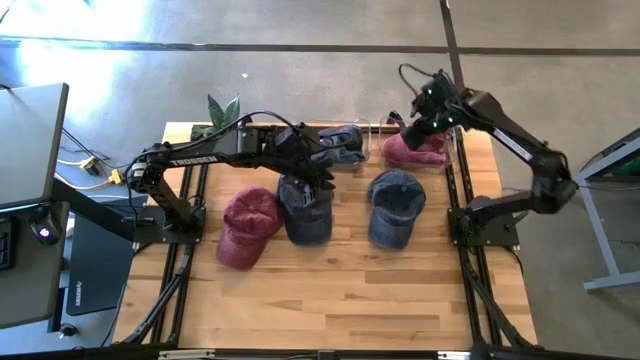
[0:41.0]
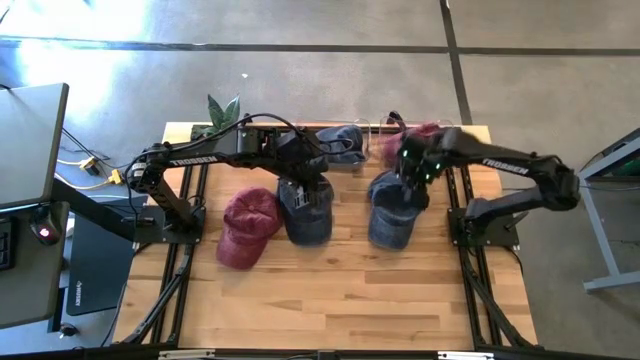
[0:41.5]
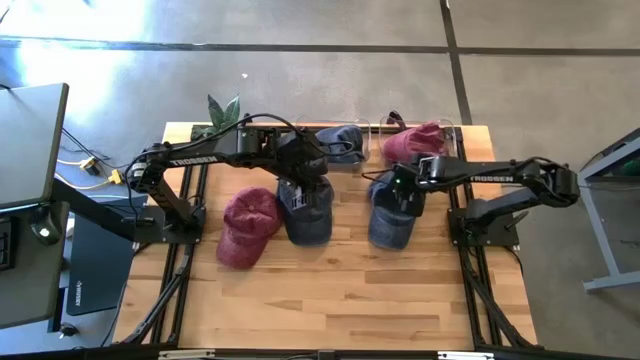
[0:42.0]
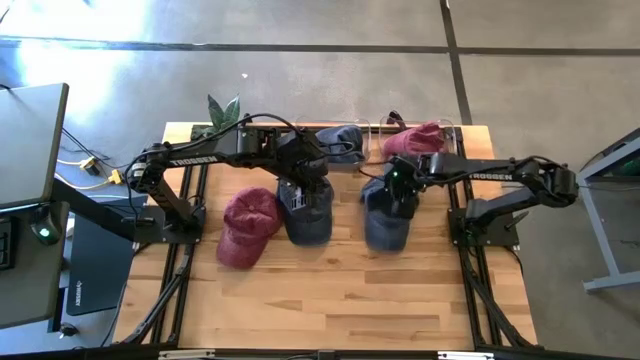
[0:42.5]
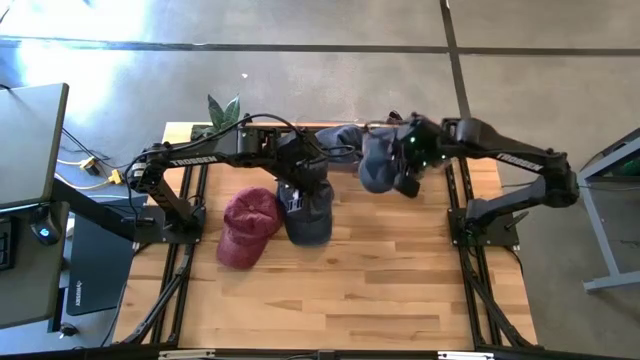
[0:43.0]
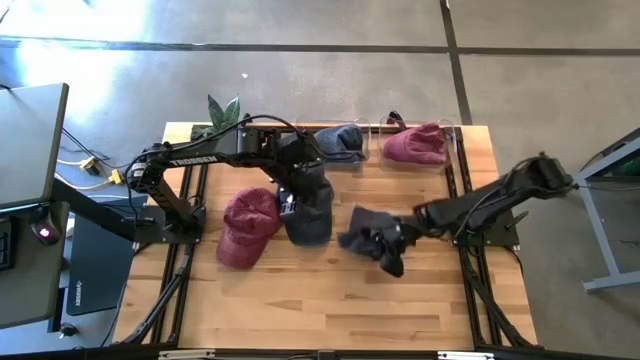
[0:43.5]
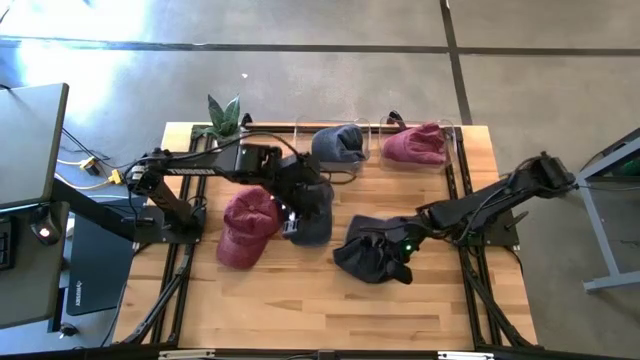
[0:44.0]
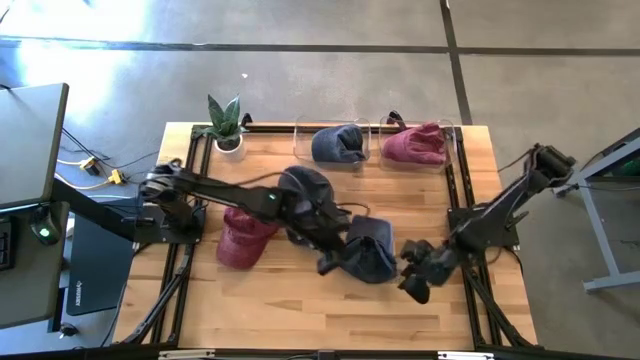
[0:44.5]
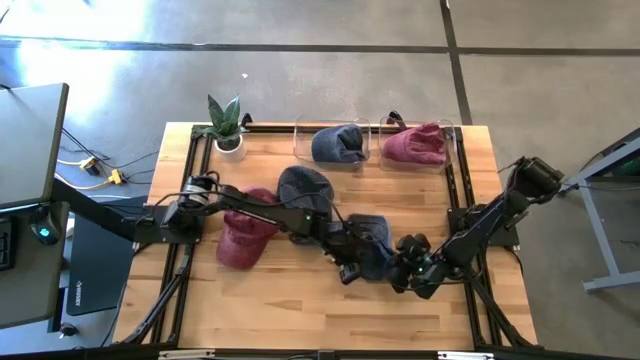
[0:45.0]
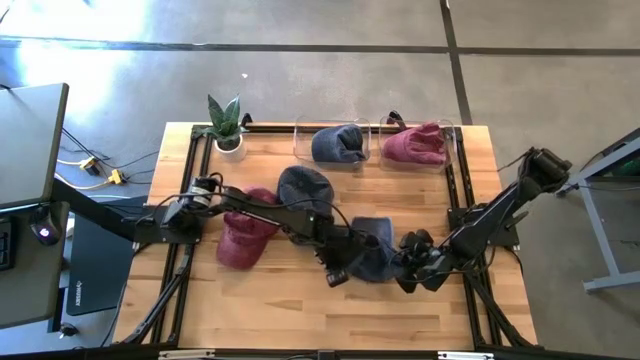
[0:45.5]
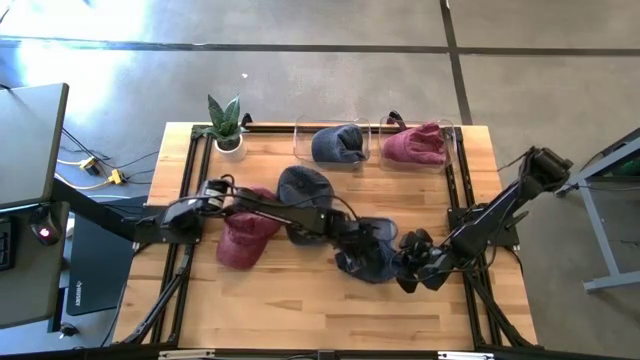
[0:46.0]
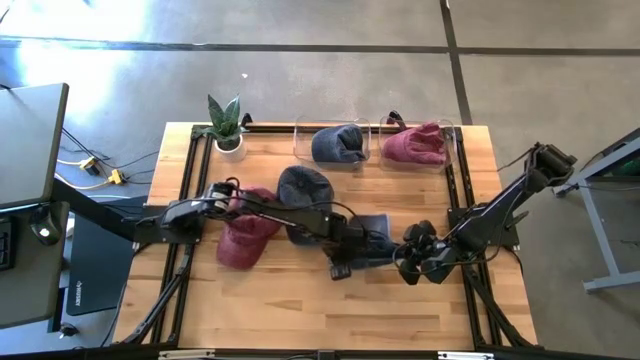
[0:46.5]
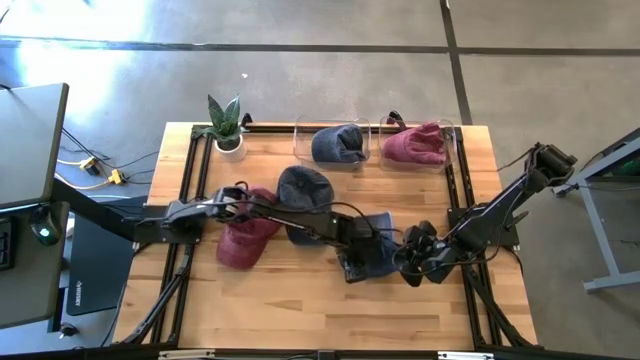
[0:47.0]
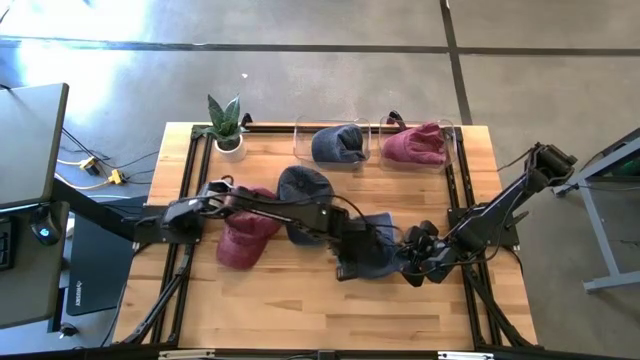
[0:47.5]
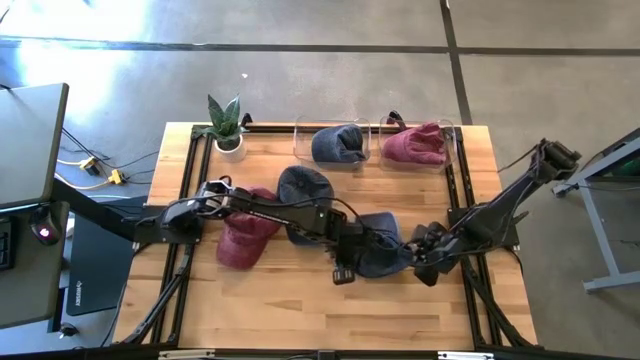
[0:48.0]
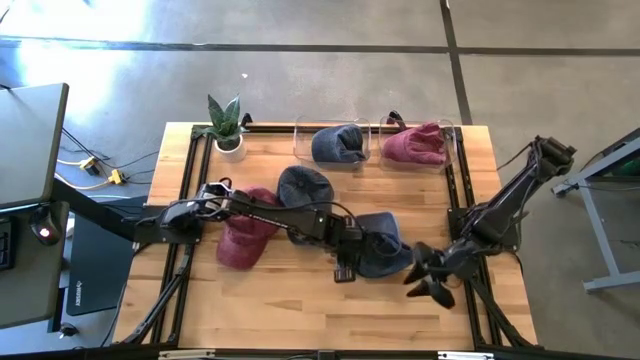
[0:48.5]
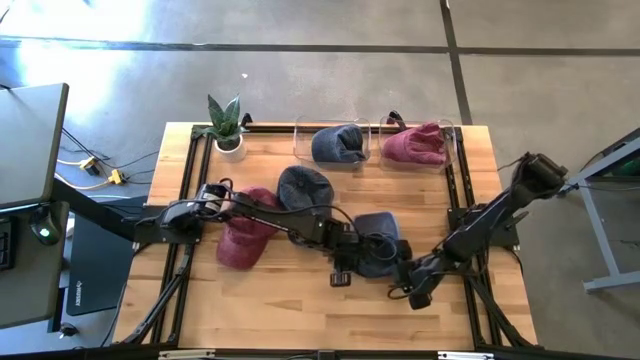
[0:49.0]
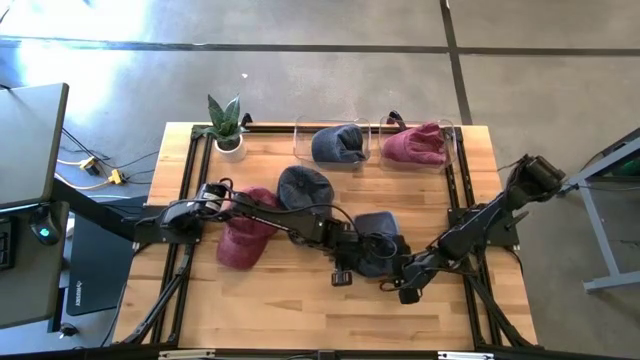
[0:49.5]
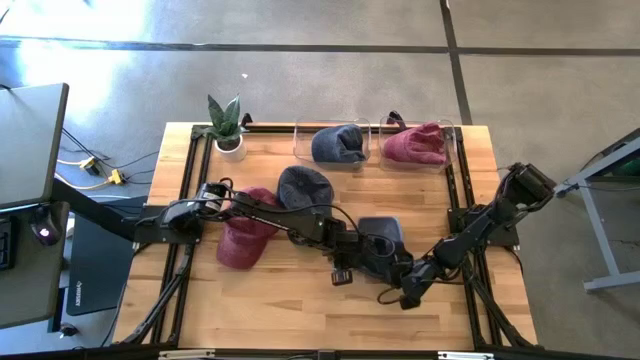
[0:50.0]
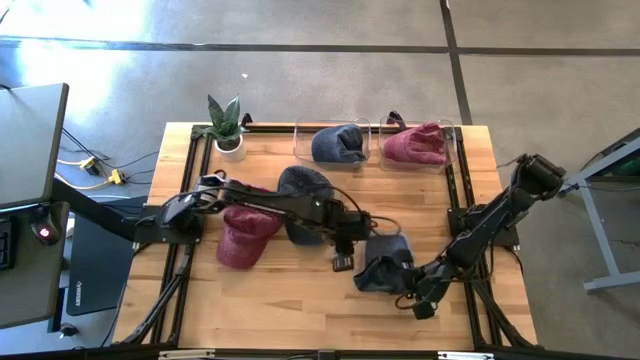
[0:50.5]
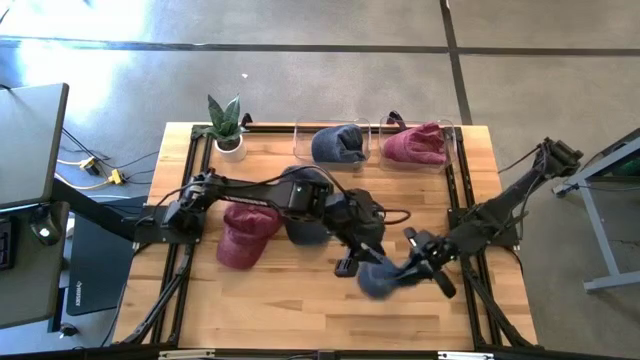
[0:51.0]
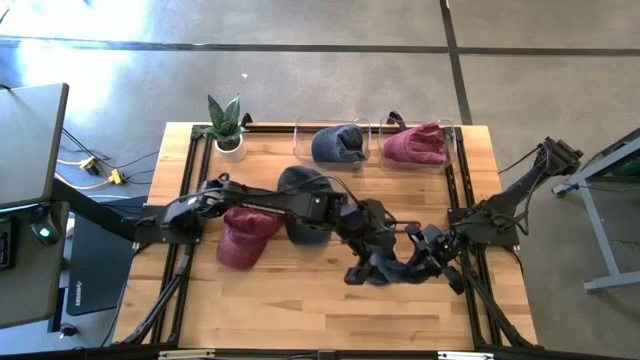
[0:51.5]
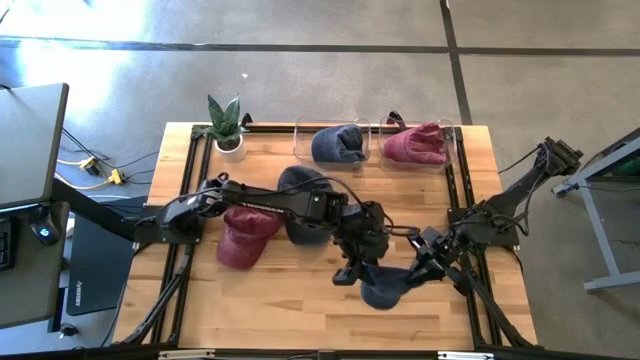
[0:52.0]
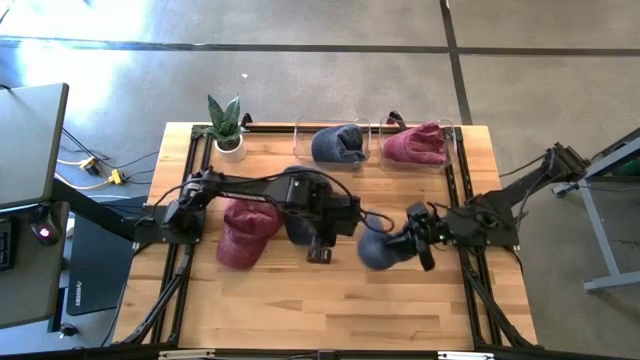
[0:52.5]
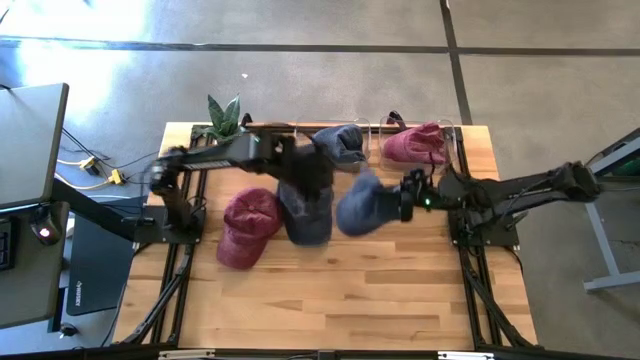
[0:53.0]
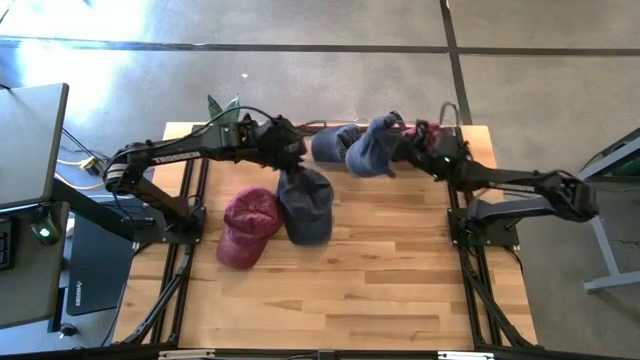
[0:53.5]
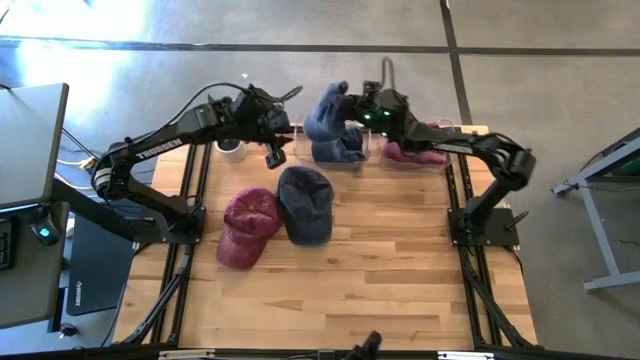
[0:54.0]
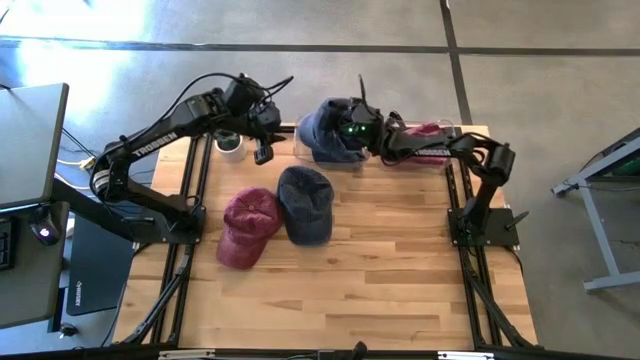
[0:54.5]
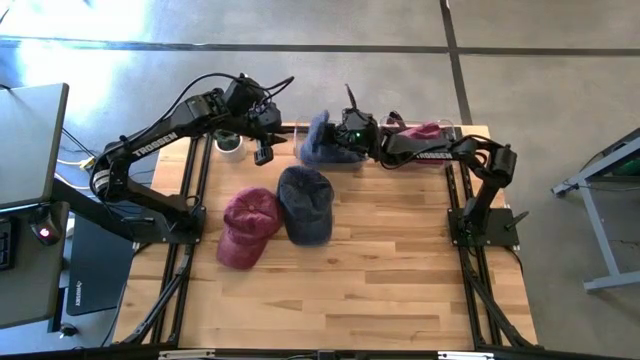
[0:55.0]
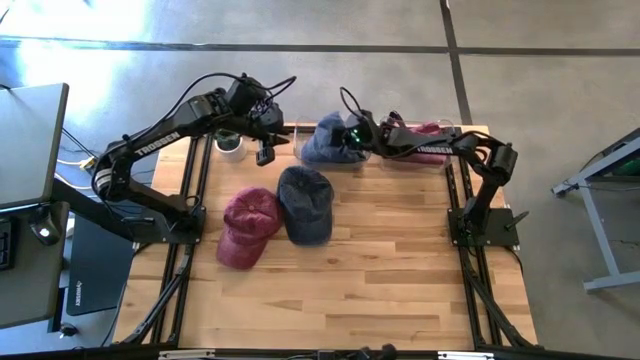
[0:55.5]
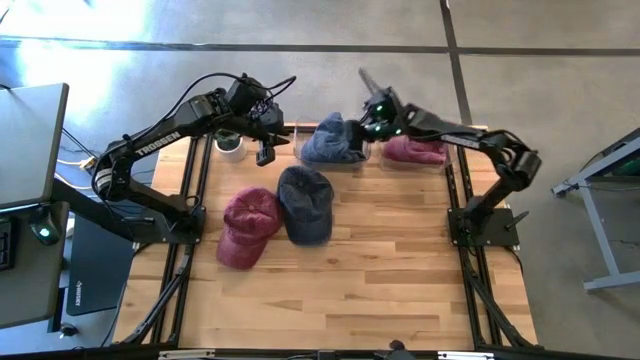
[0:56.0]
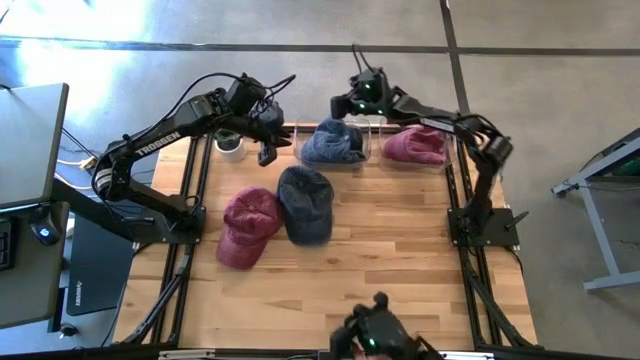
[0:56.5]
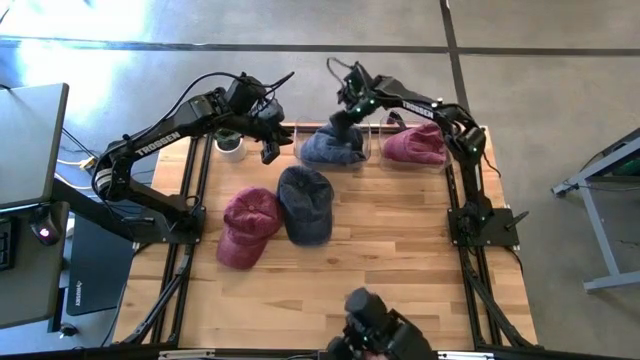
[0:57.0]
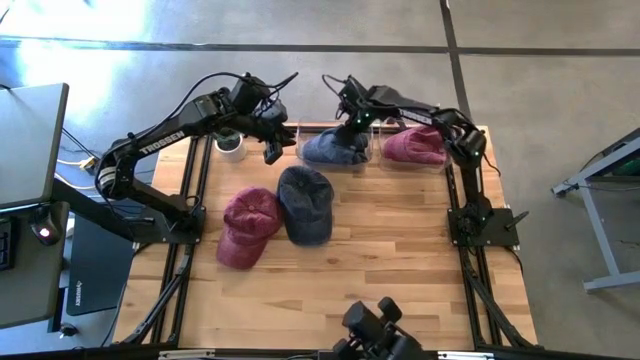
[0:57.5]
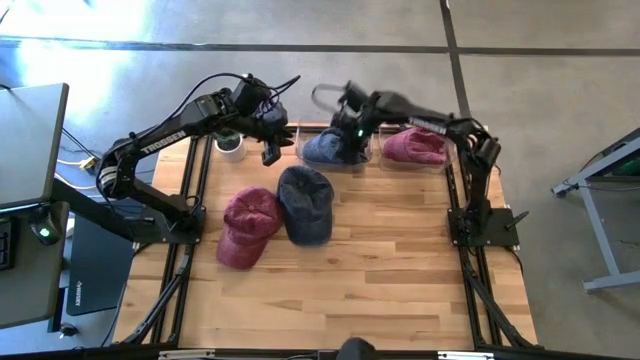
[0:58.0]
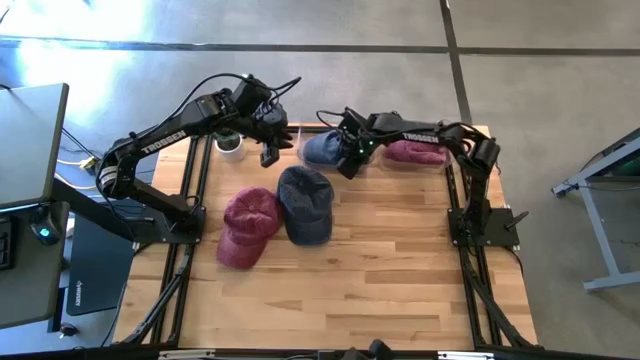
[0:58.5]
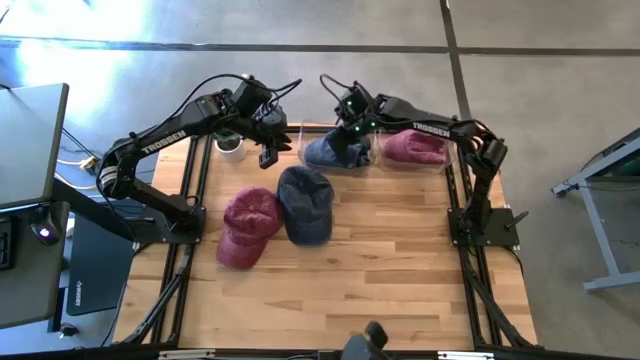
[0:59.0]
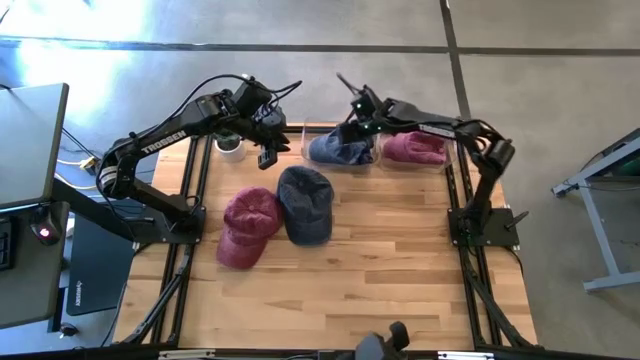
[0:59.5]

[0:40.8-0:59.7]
Task: Pick & Place hat
Put the right dark blue cap into the left transparent bin

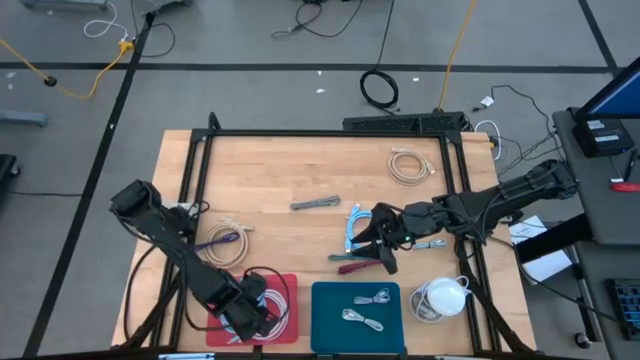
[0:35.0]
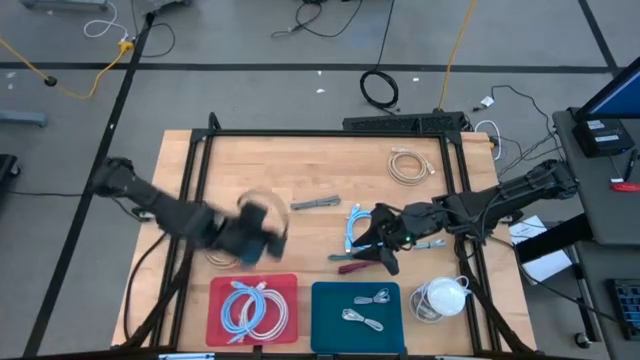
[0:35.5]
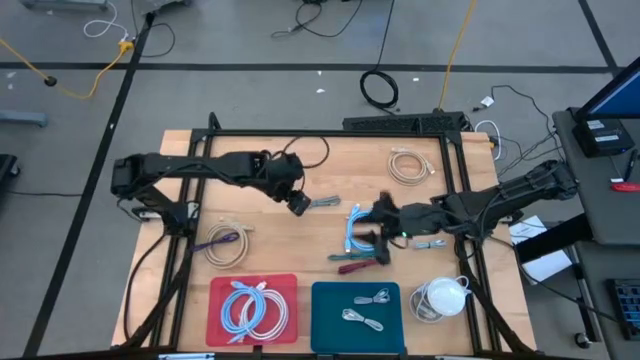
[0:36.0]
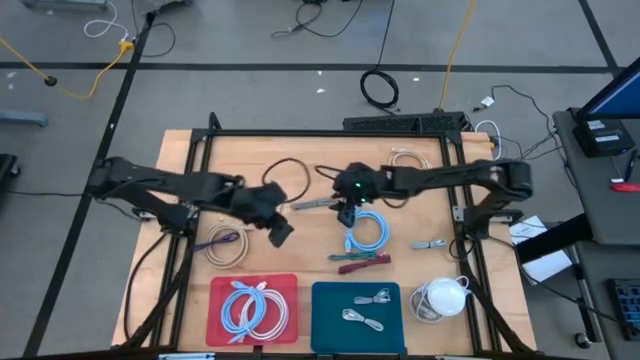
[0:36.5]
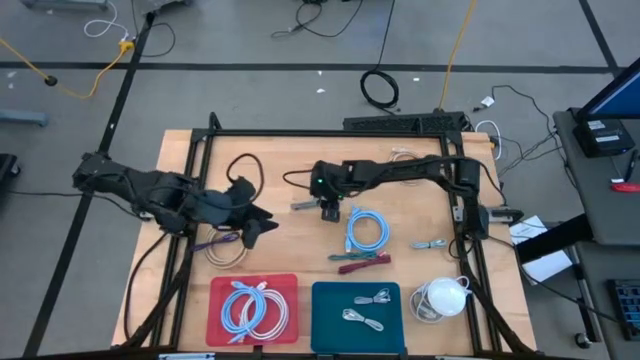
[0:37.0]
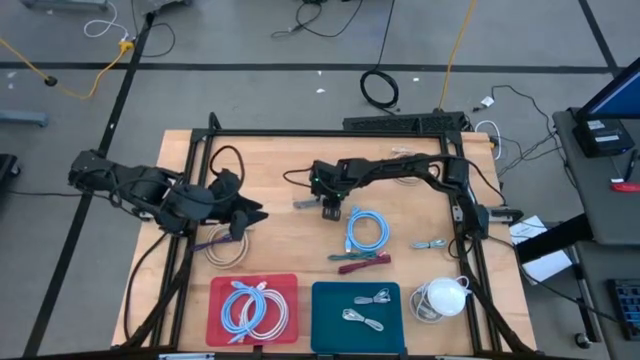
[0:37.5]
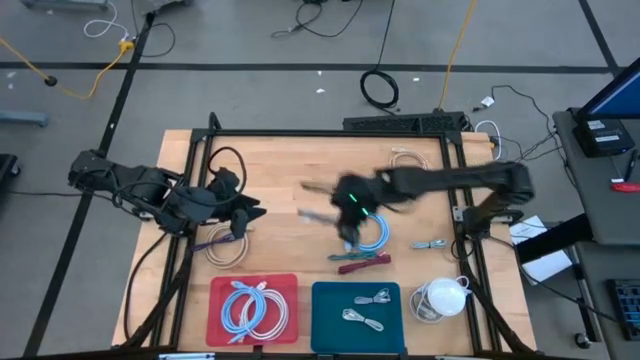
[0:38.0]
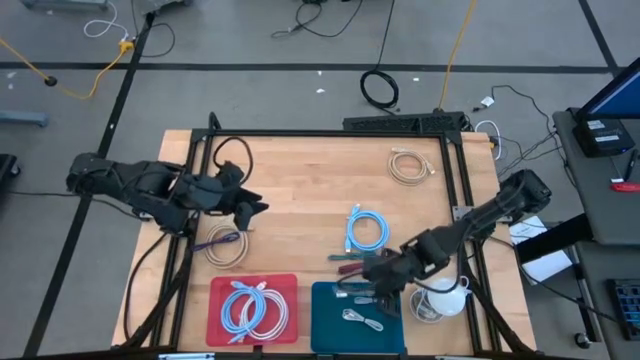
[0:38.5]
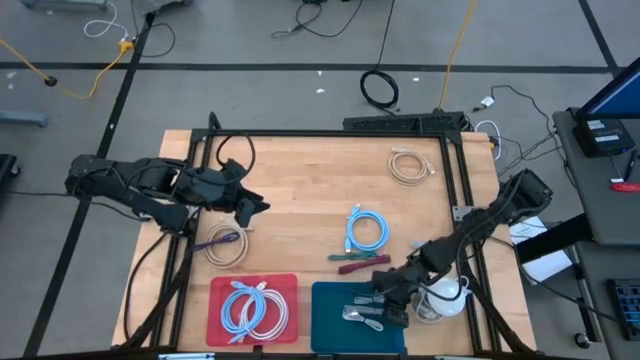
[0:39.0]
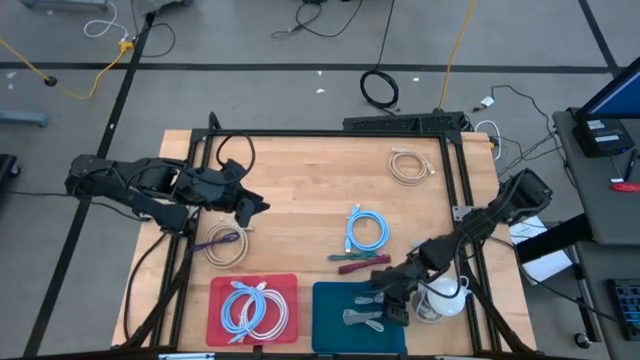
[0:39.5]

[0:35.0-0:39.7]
Task: Pick & Place USB Port
Put the black and white USB cable into the blue bin
